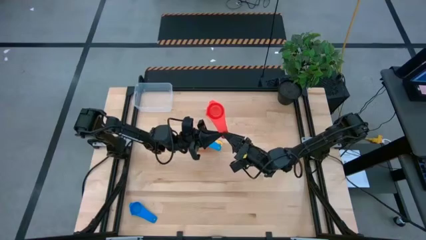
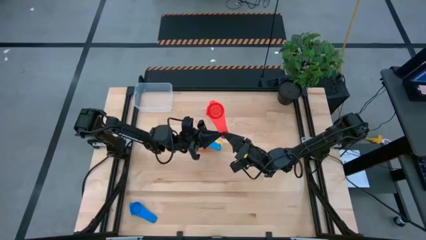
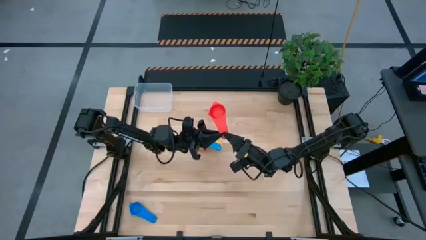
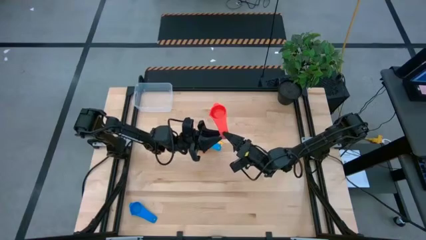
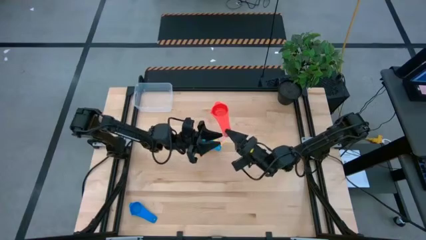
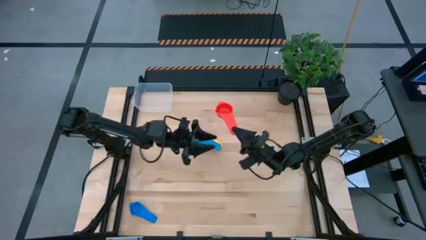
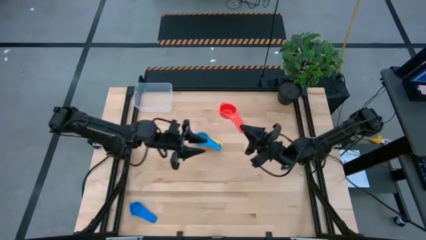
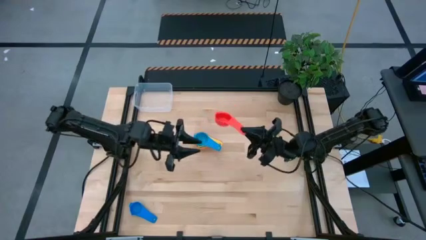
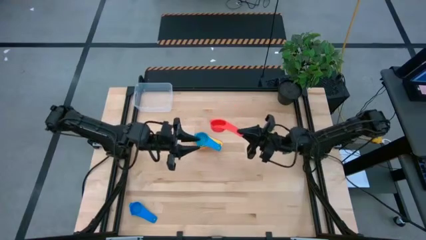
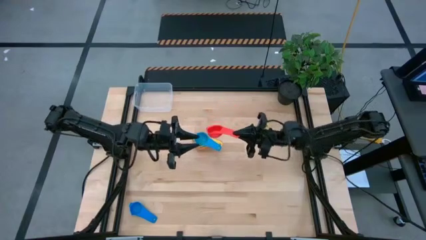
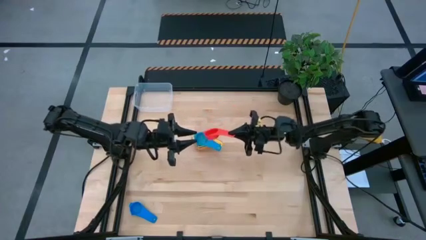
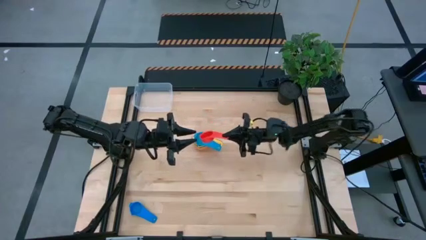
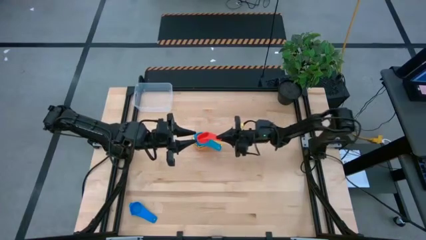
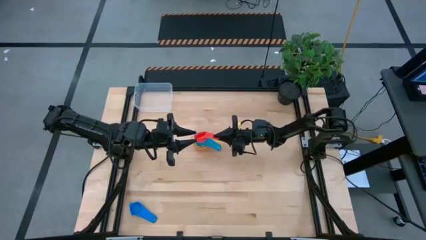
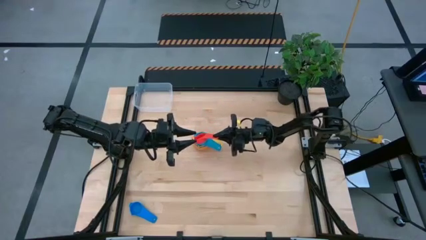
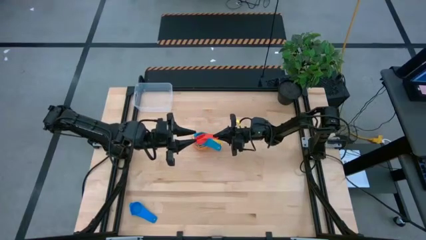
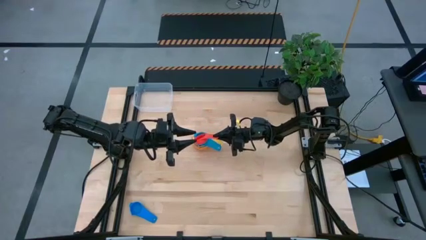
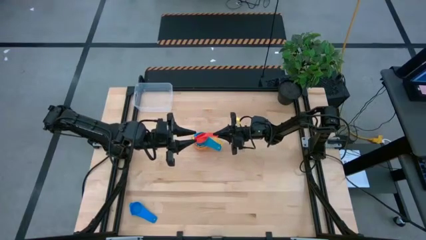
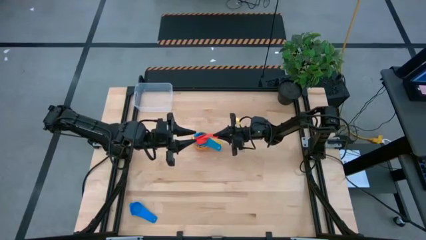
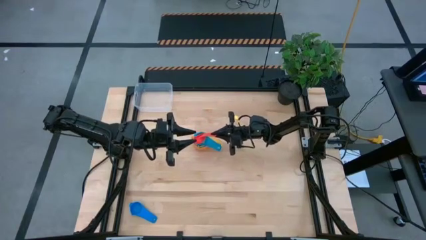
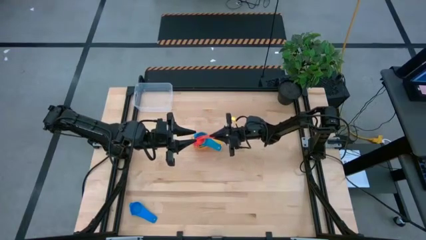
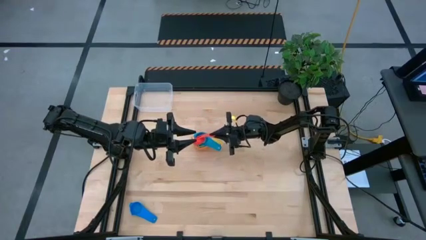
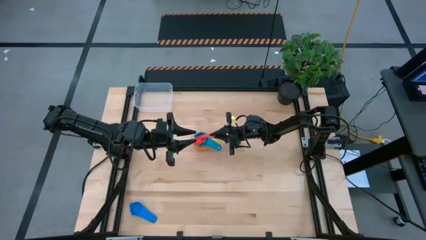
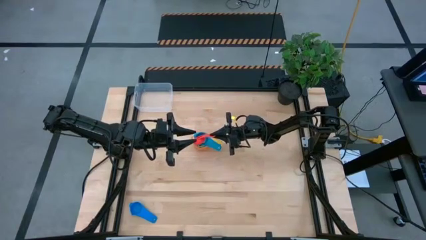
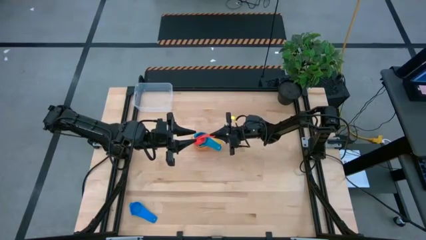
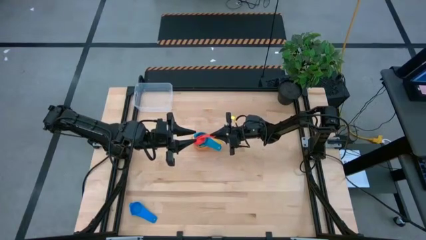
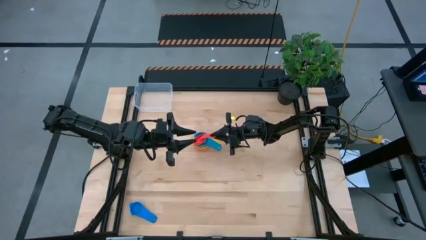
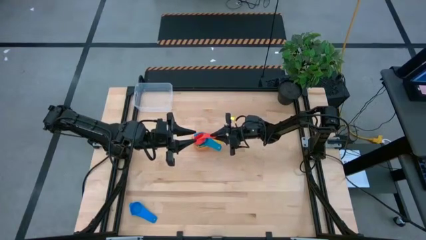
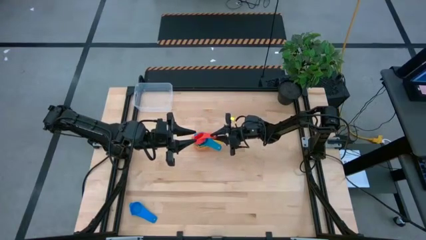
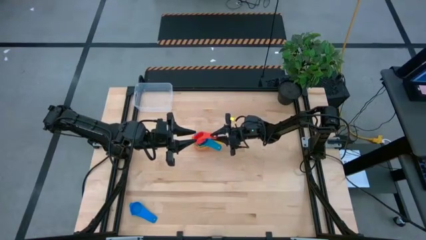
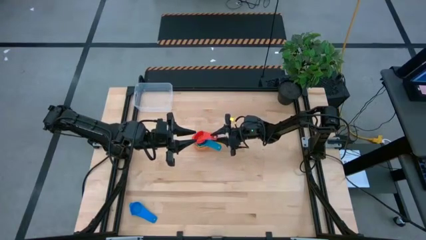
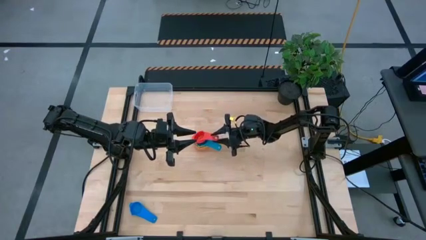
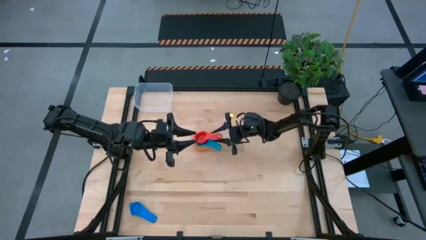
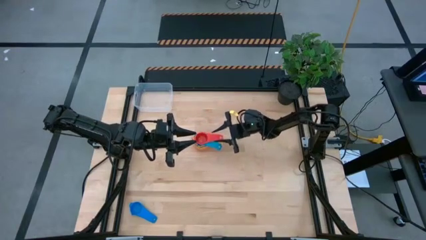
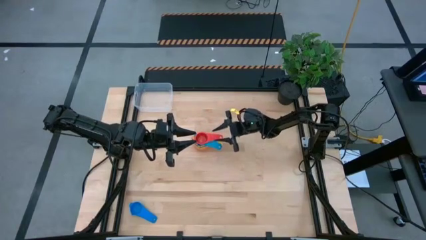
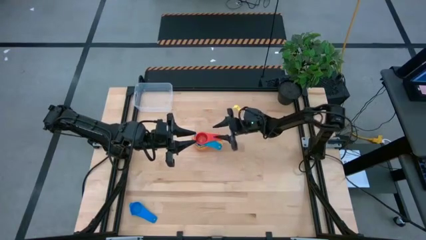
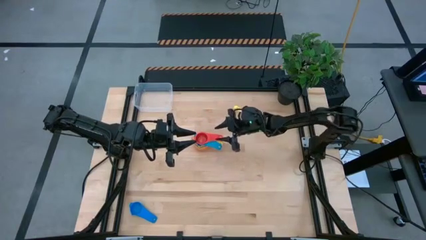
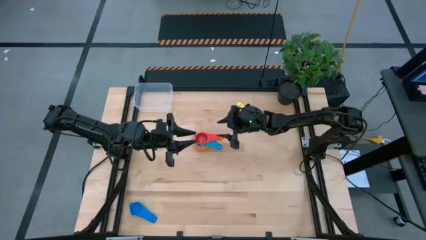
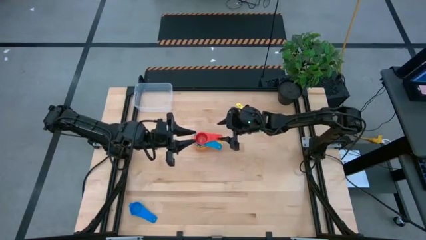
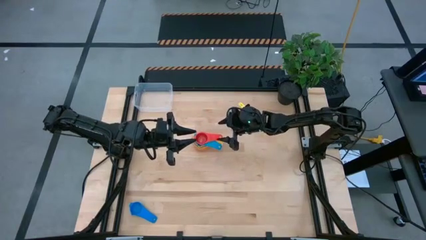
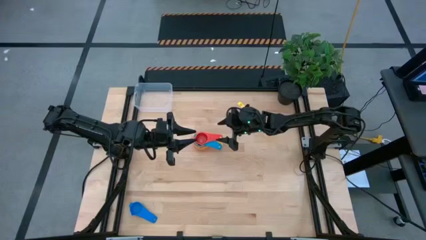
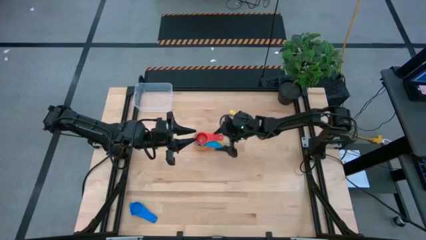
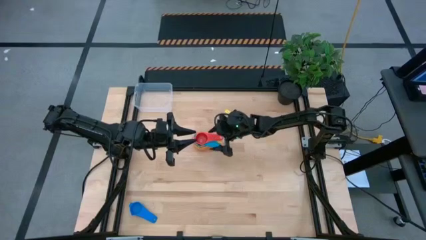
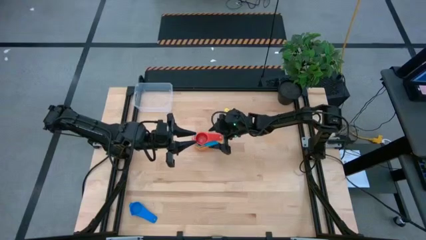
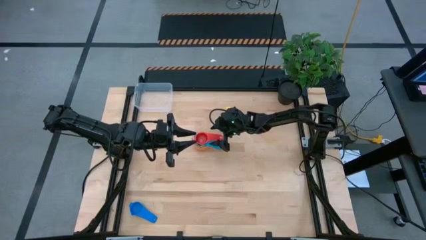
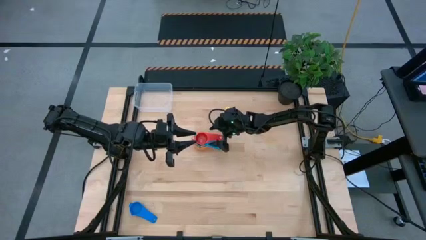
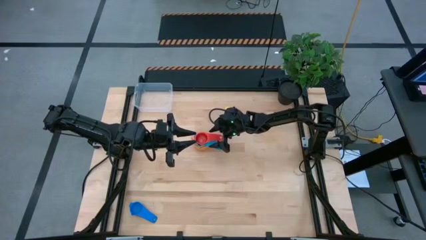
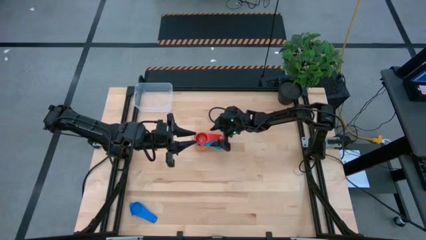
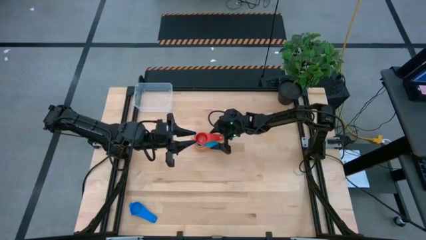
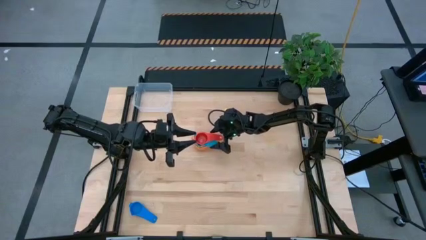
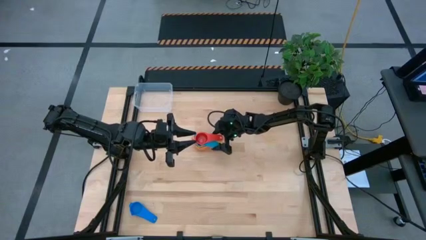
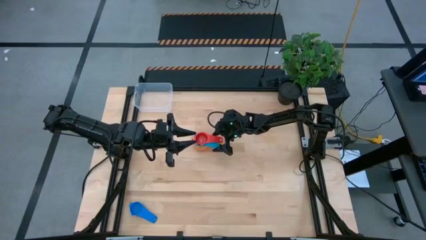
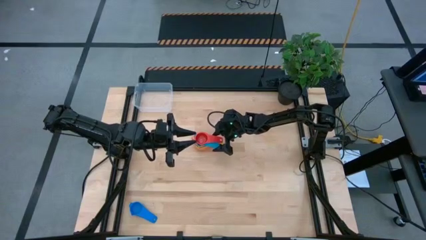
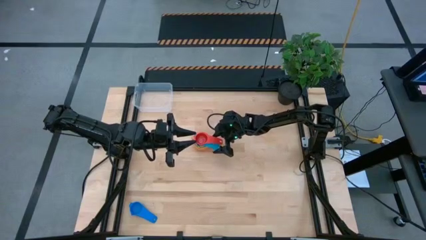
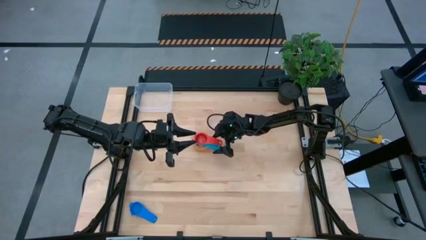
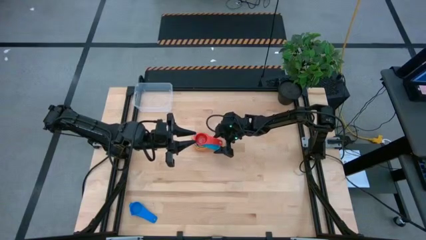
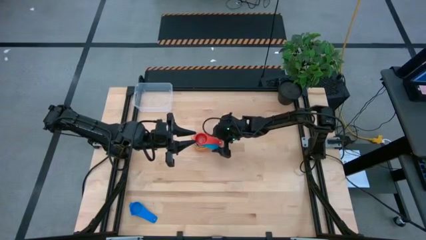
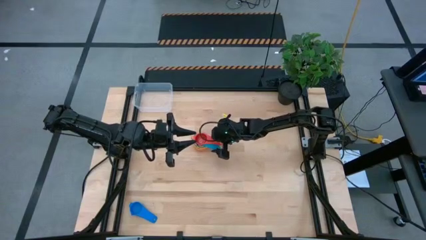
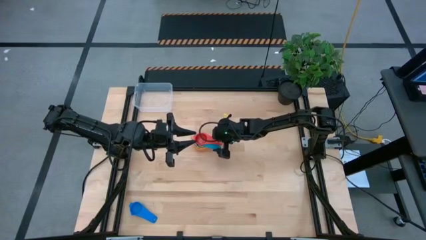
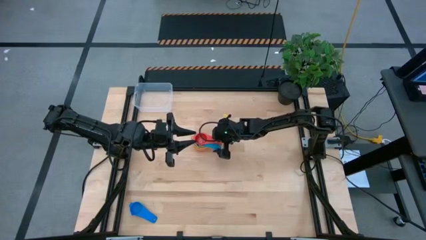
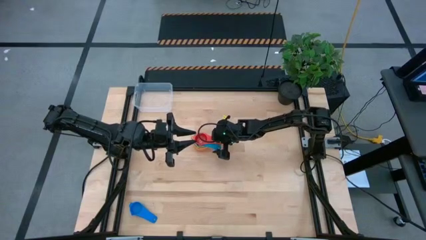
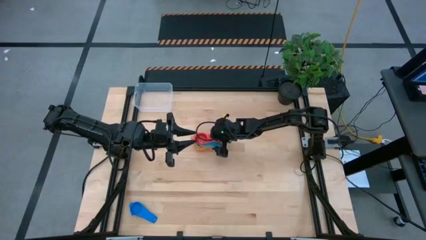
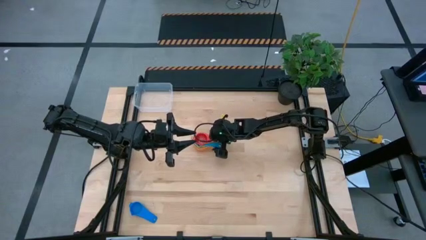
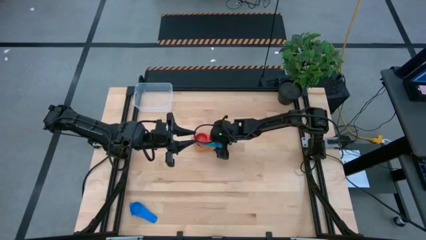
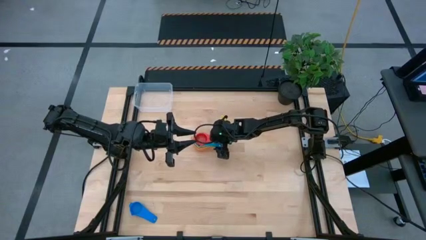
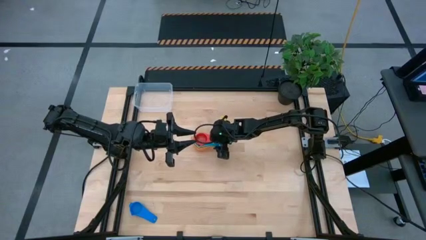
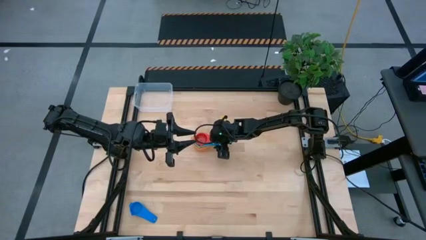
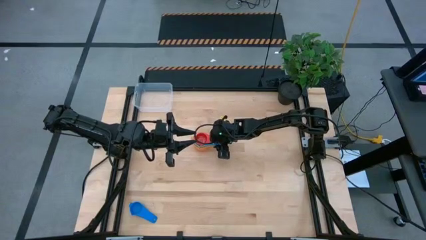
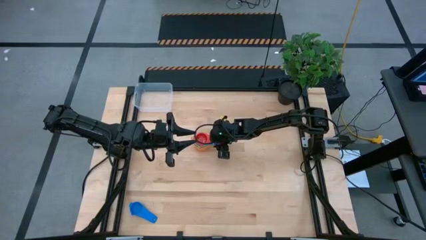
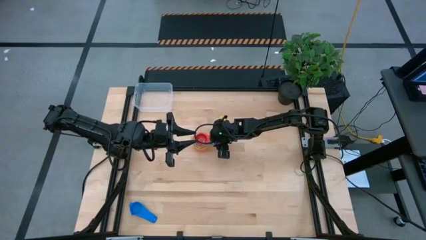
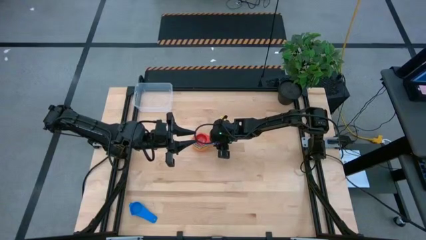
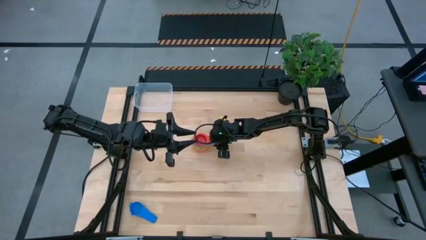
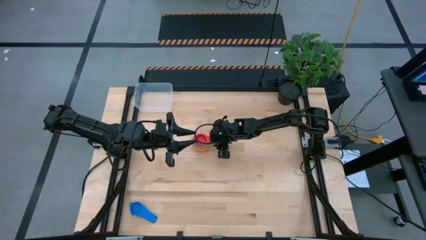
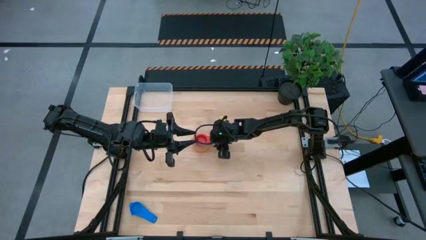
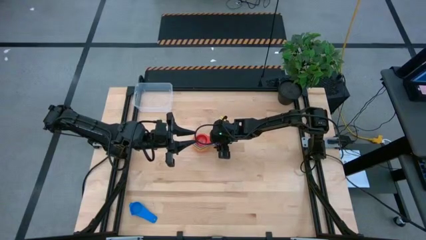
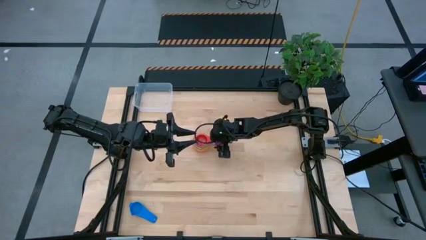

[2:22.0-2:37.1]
Task: Nest measuring cups in basket
Stack the red measuring cup on top of the light blue measuring cup
